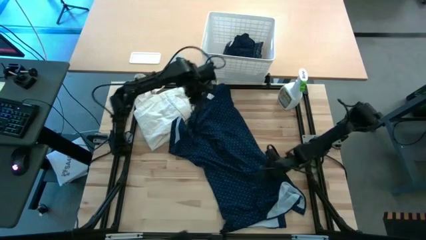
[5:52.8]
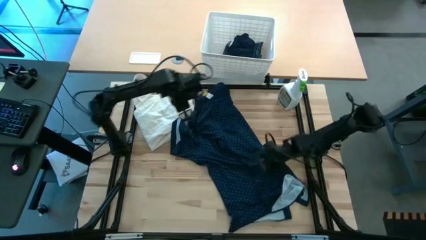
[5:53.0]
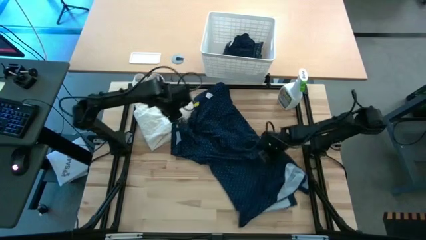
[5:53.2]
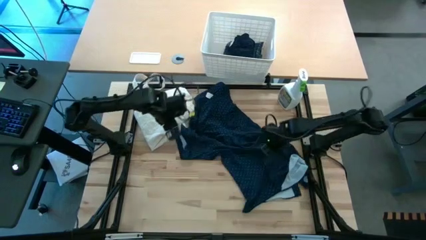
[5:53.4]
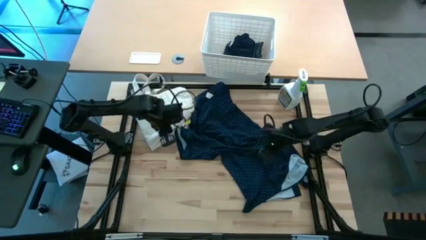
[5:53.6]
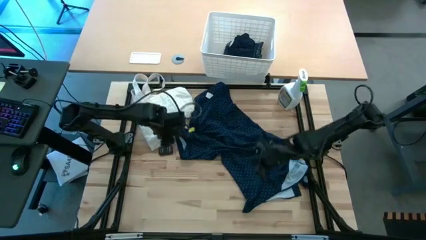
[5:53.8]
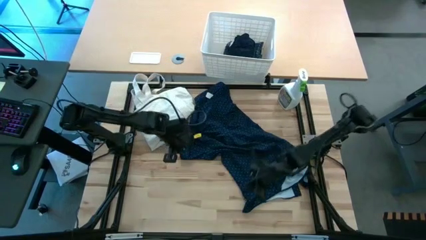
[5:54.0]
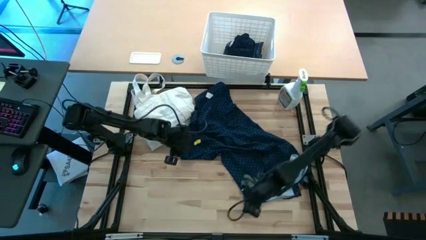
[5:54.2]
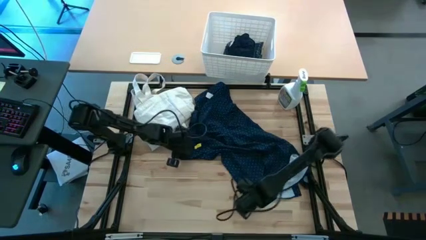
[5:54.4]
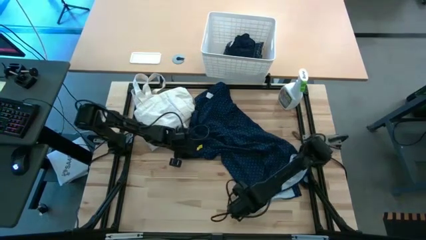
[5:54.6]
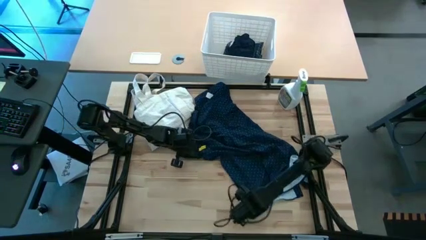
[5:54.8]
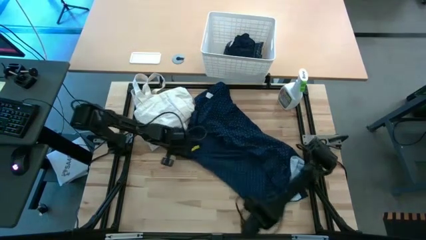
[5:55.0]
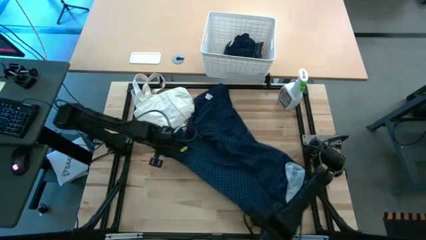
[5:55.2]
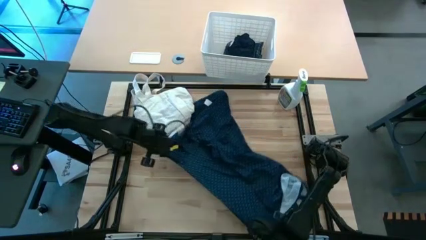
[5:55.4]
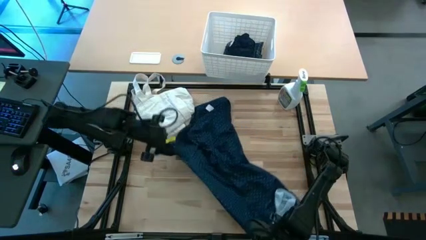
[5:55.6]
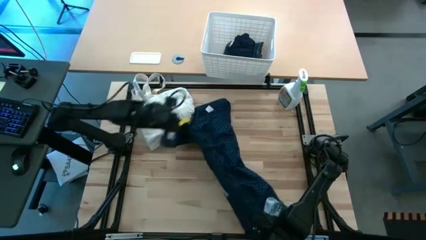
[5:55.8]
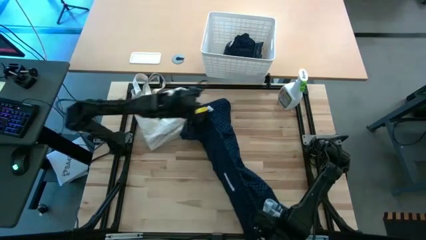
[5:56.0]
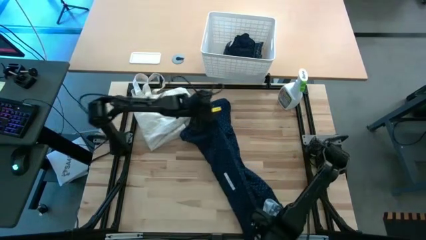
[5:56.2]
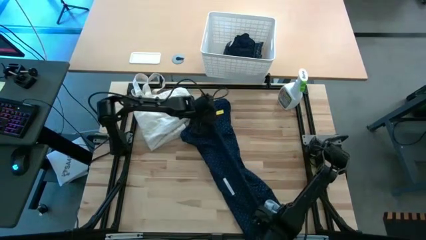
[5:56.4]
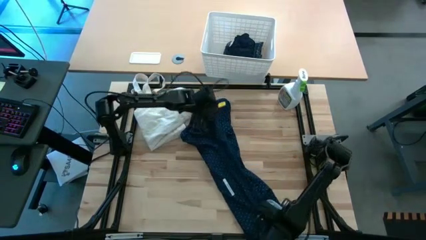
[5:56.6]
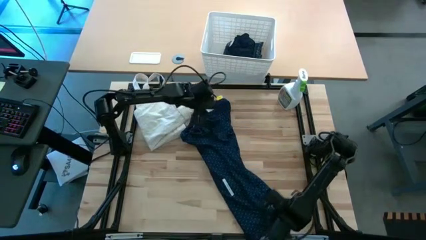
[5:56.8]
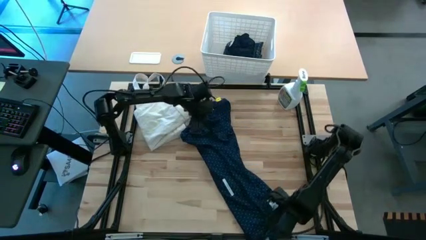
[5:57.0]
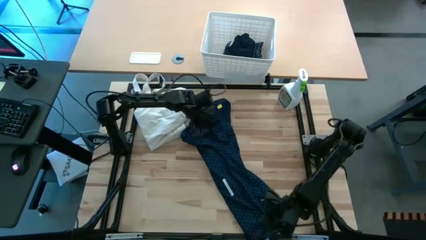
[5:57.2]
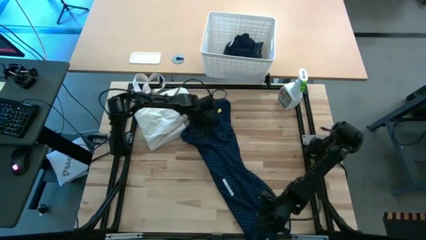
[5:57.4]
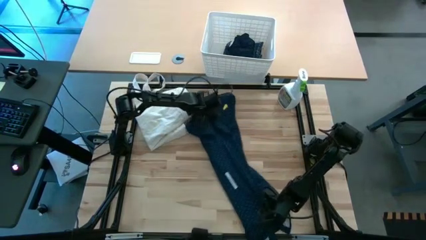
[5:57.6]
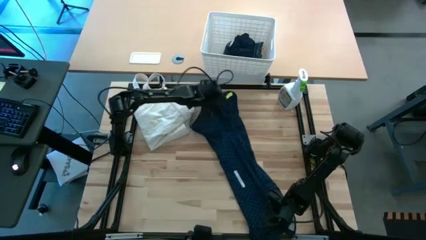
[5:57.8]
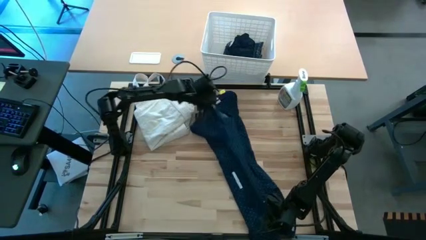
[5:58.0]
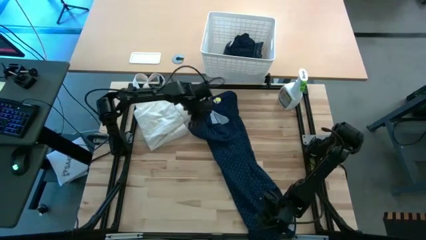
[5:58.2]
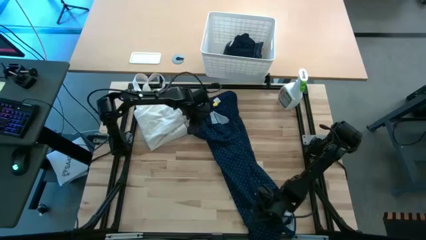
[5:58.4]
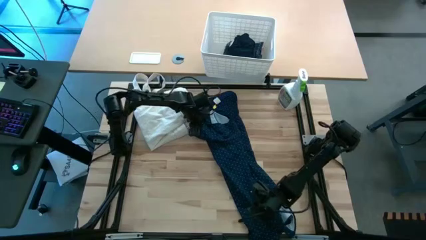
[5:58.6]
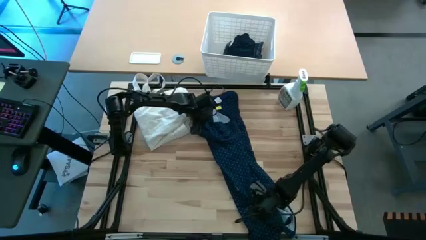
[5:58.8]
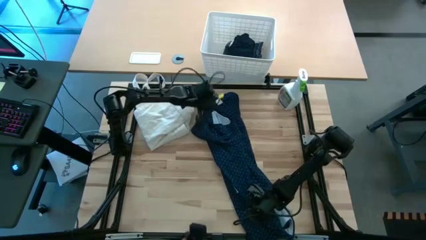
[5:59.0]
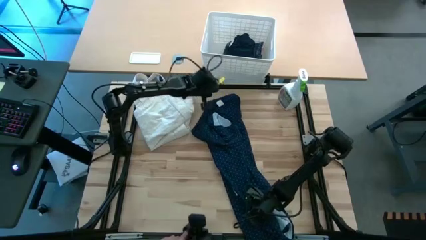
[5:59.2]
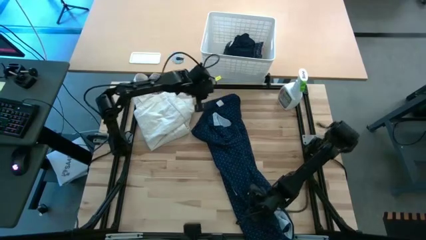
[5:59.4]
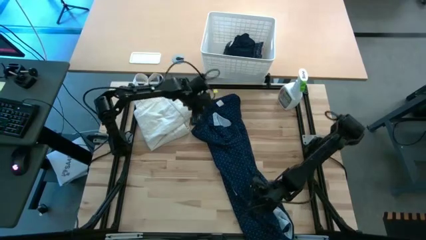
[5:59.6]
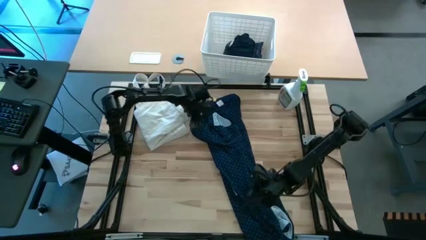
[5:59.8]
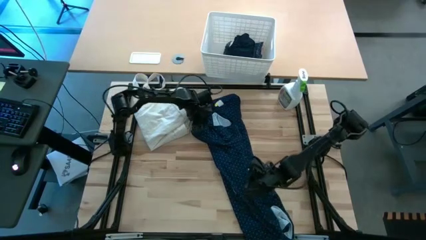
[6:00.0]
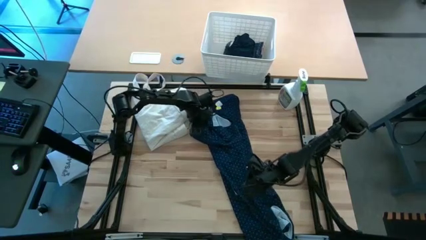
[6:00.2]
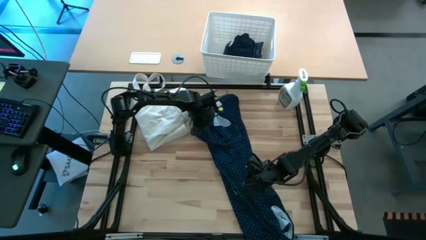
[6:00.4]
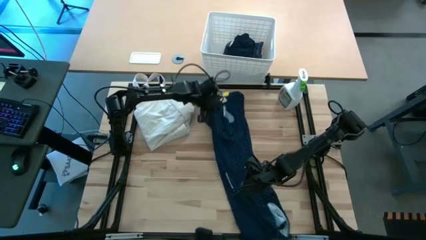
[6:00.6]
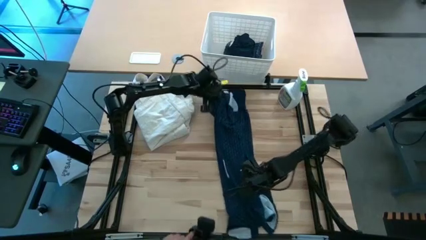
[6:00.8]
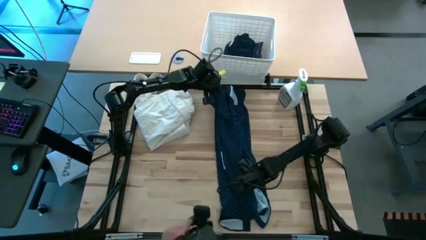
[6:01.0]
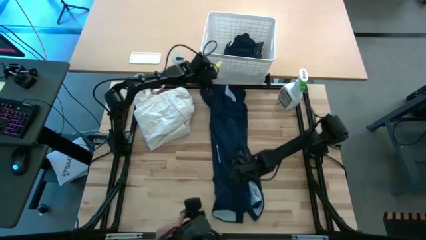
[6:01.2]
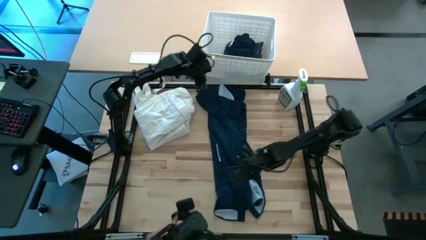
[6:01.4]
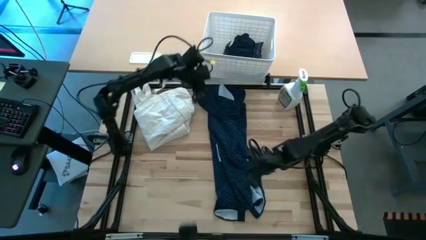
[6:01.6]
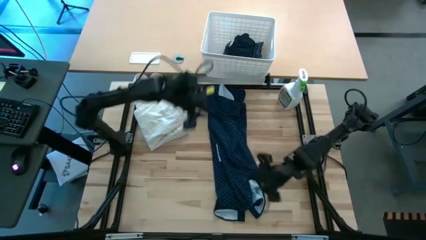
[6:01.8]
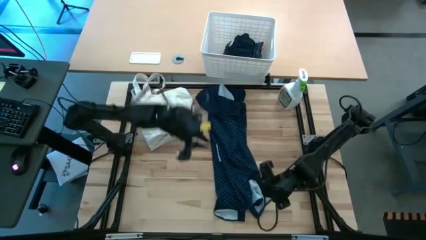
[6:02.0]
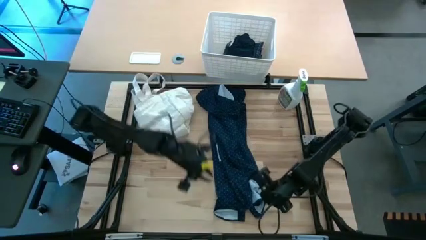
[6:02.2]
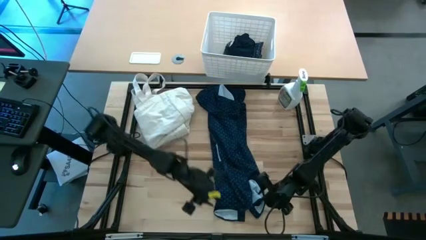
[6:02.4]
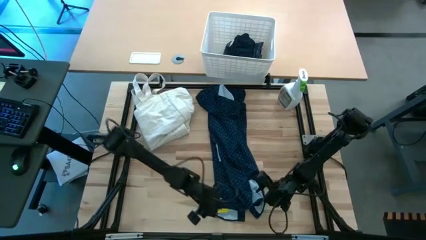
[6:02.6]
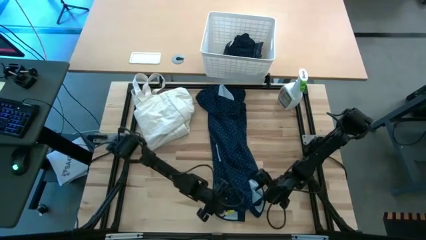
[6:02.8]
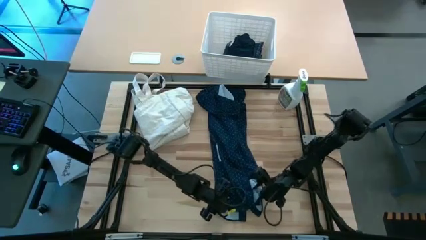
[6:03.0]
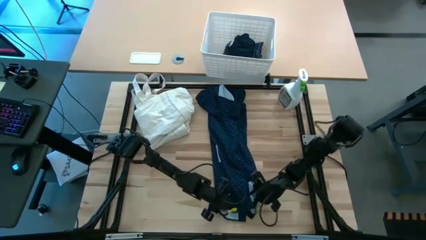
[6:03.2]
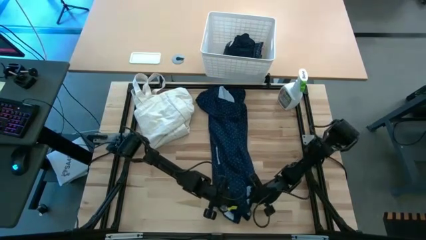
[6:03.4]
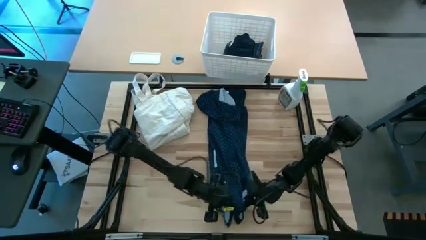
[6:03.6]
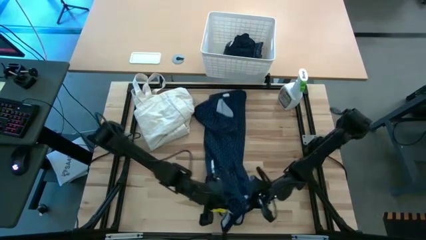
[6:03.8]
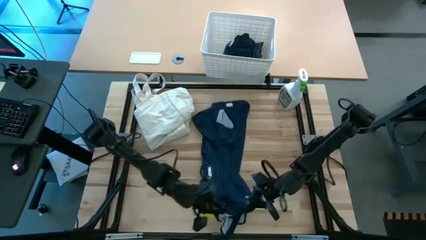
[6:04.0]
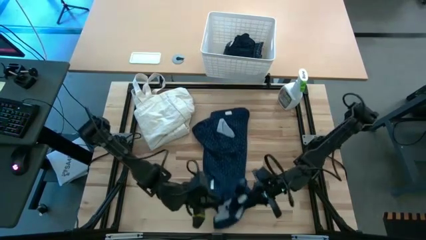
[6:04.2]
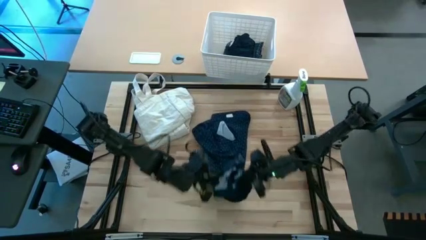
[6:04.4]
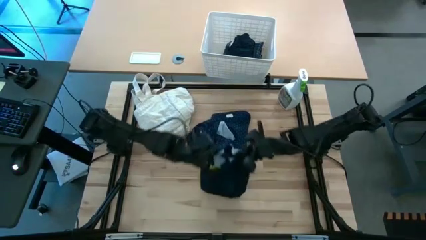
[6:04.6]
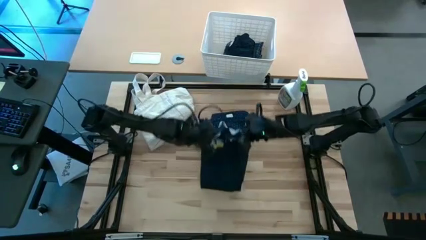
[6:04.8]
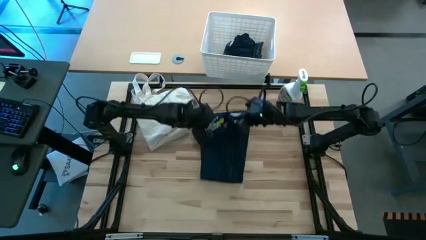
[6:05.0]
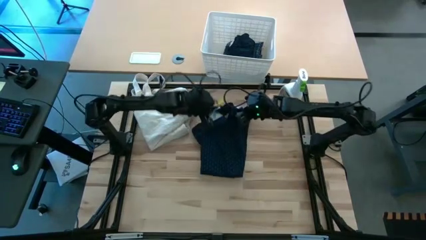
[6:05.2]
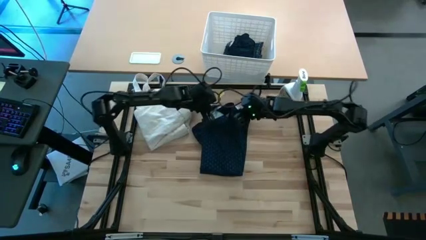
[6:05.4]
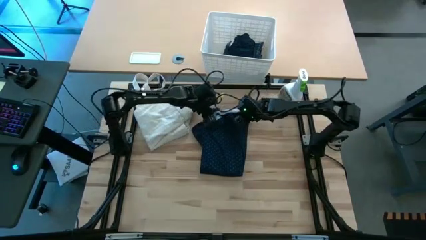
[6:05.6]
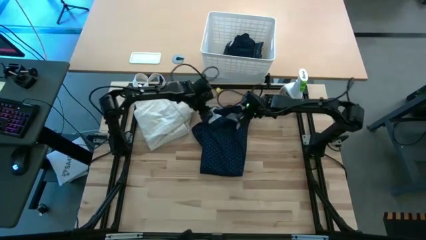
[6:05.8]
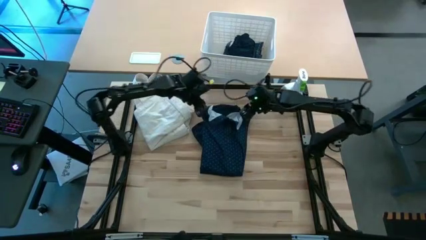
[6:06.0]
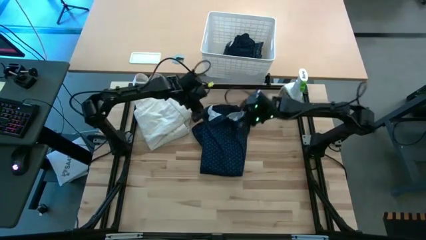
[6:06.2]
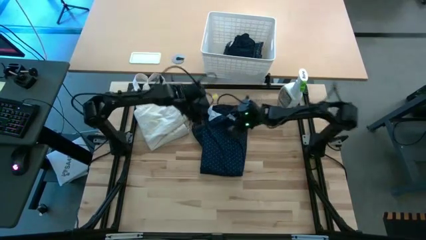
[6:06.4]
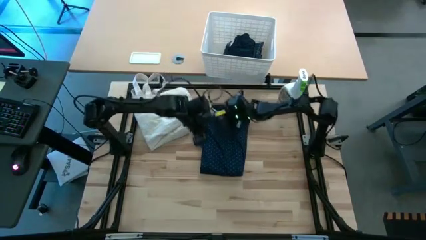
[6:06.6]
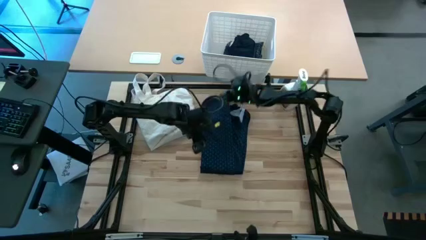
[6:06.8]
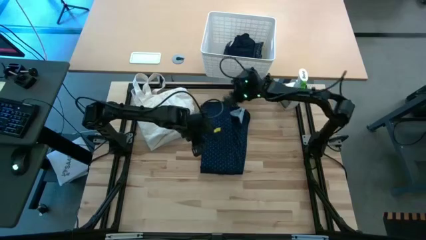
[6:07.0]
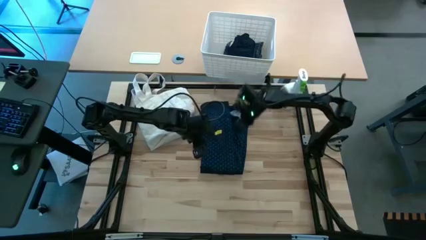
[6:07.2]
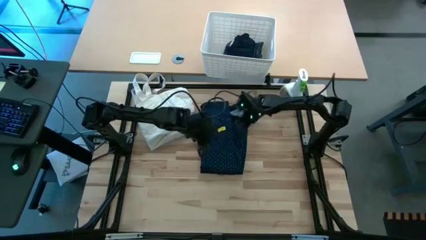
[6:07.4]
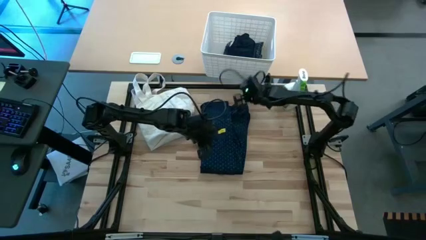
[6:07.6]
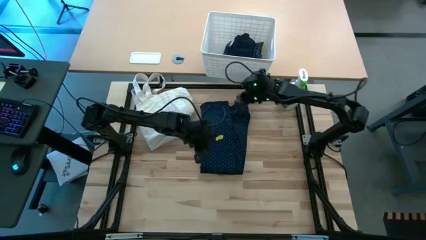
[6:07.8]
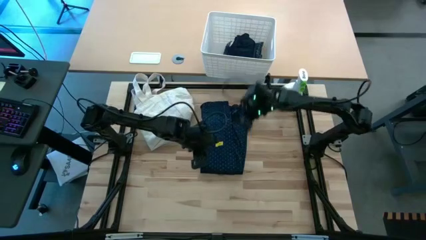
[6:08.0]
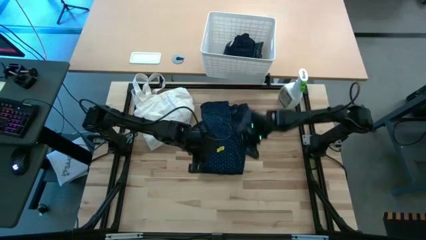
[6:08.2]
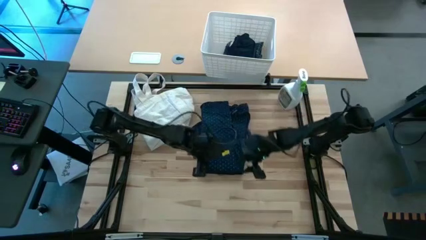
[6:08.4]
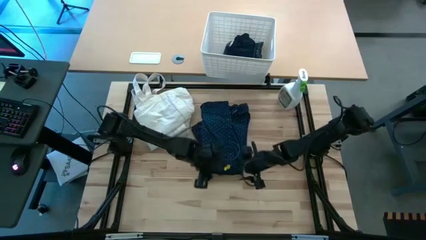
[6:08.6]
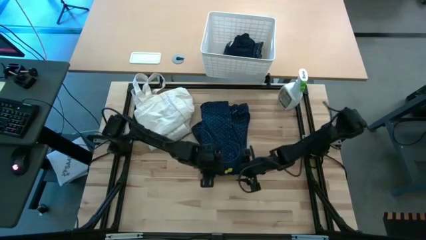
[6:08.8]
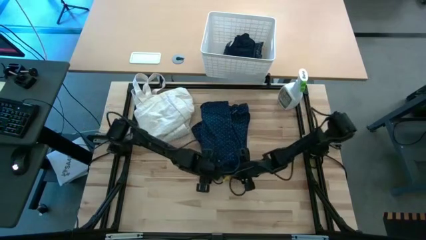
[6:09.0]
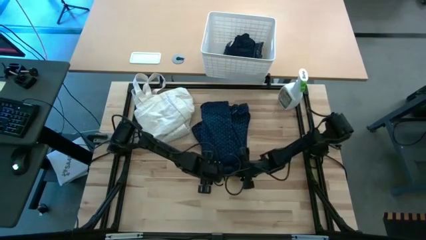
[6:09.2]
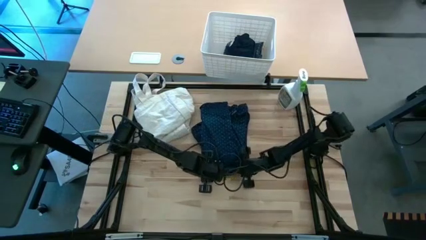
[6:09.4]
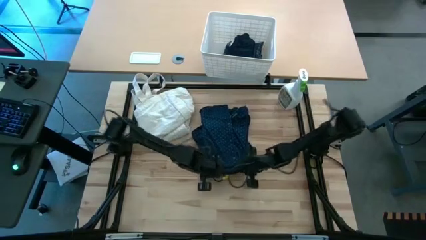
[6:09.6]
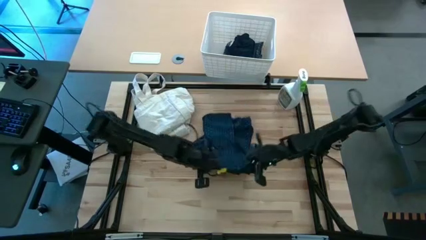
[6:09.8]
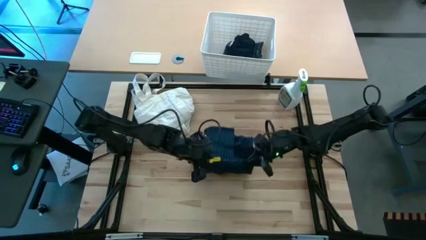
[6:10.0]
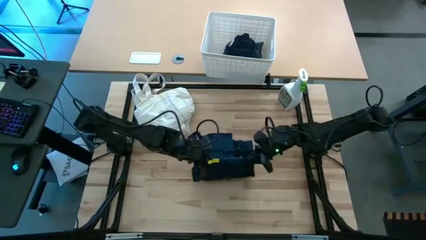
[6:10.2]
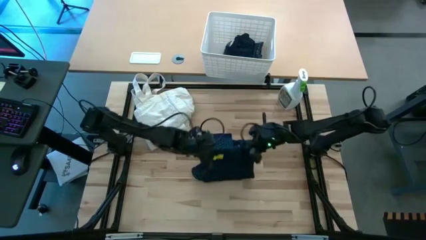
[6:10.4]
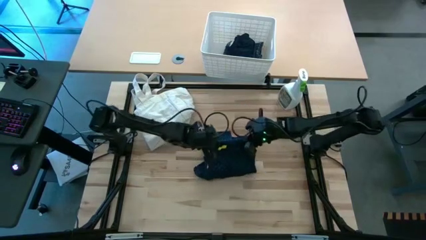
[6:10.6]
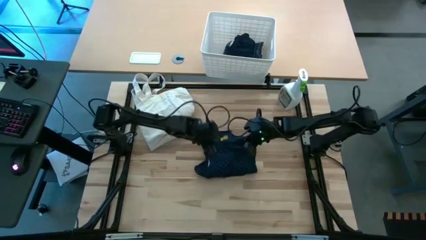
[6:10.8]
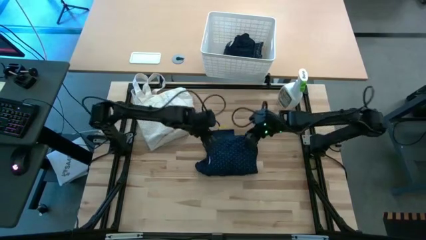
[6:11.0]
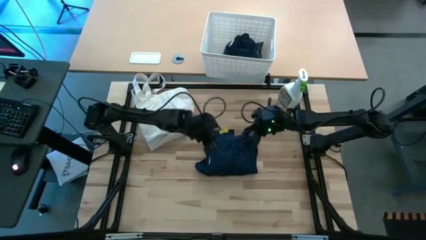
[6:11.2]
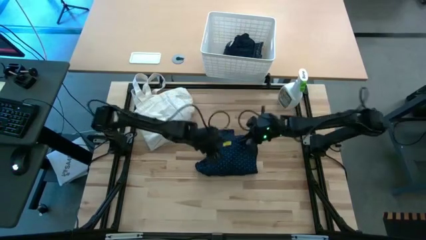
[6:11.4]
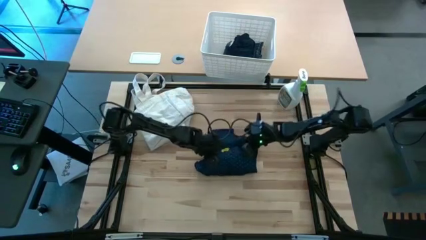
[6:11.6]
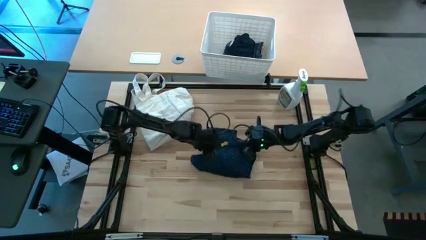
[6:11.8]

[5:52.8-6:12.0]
Fold the blue polo shirt
